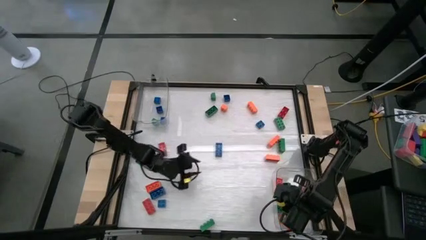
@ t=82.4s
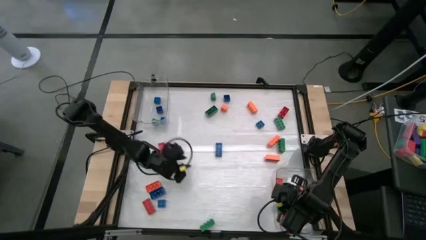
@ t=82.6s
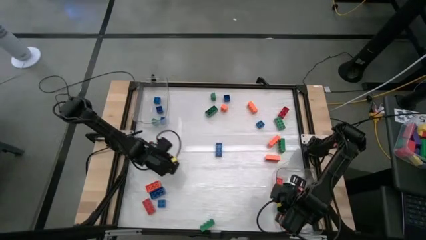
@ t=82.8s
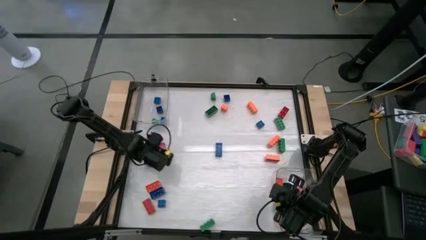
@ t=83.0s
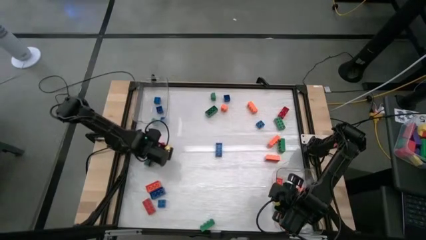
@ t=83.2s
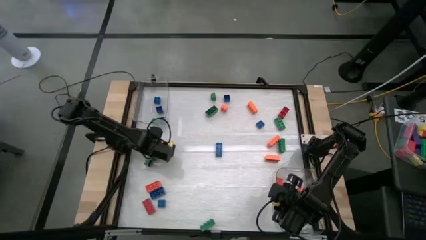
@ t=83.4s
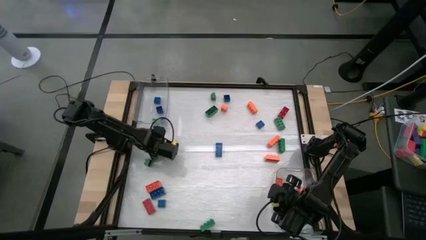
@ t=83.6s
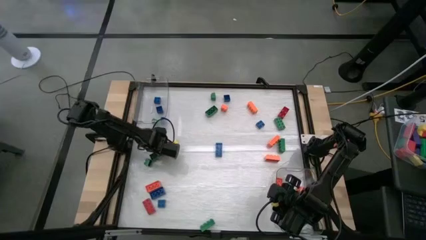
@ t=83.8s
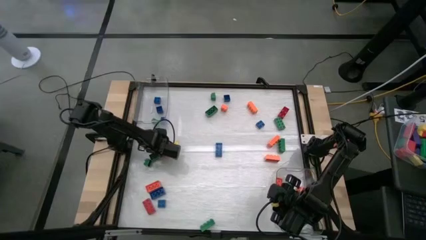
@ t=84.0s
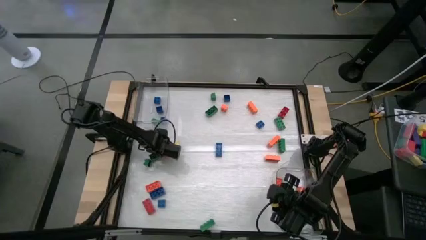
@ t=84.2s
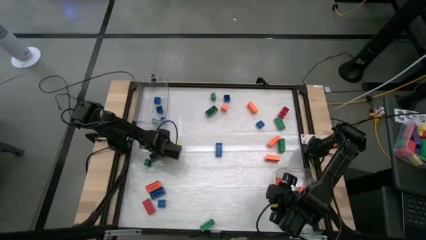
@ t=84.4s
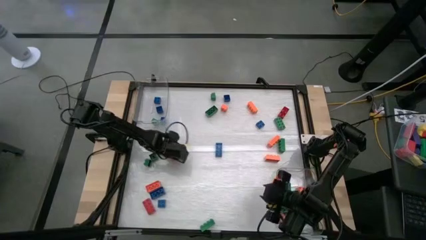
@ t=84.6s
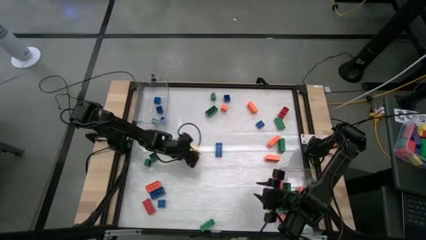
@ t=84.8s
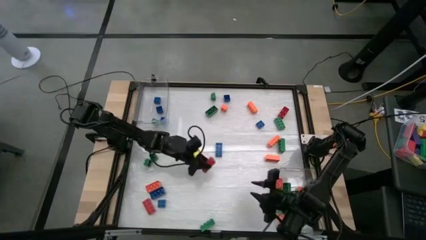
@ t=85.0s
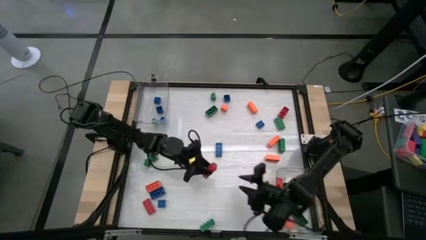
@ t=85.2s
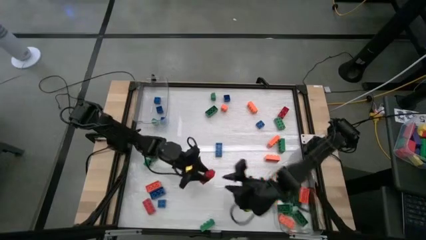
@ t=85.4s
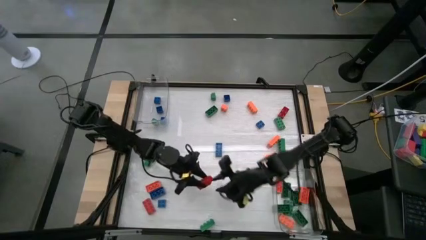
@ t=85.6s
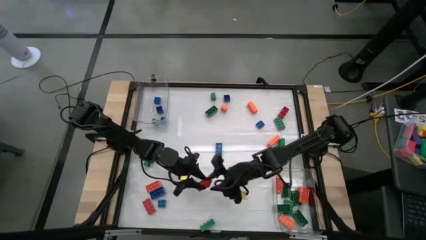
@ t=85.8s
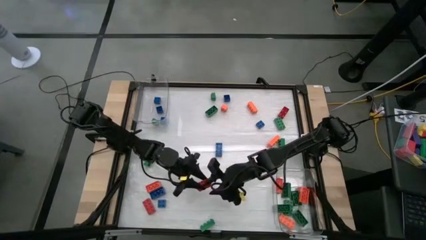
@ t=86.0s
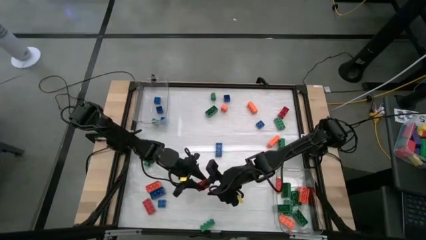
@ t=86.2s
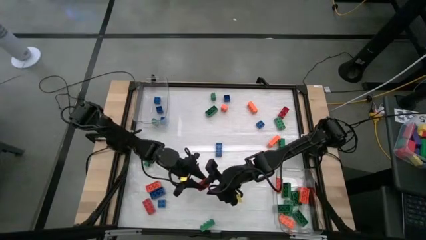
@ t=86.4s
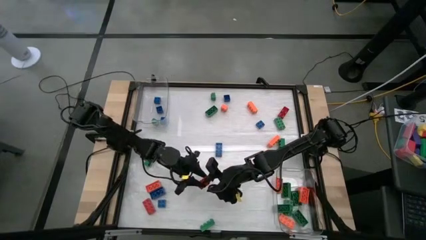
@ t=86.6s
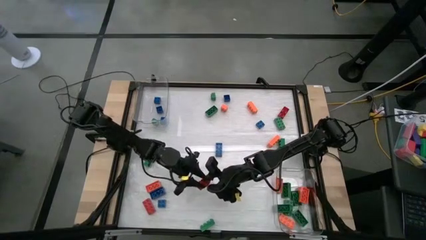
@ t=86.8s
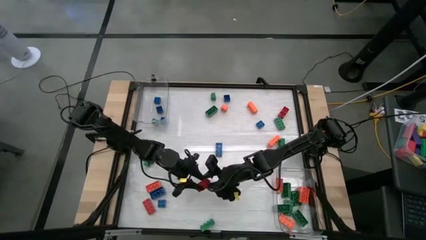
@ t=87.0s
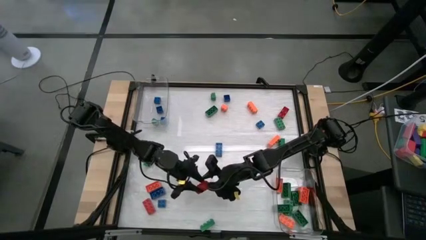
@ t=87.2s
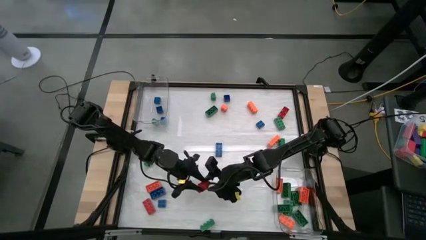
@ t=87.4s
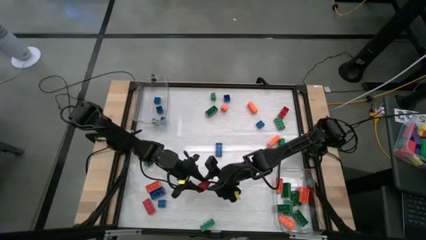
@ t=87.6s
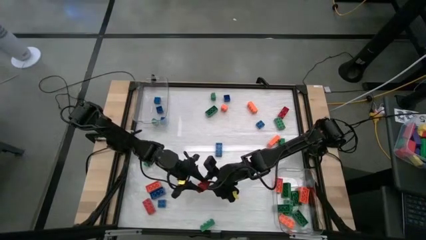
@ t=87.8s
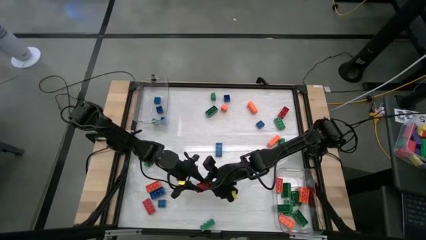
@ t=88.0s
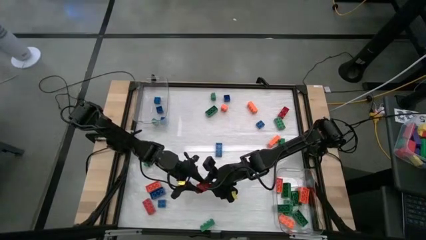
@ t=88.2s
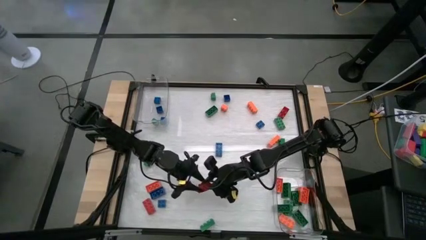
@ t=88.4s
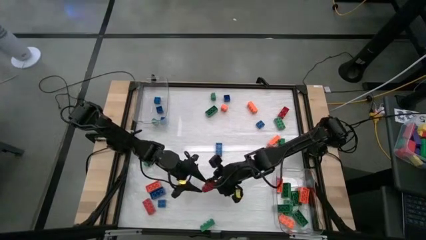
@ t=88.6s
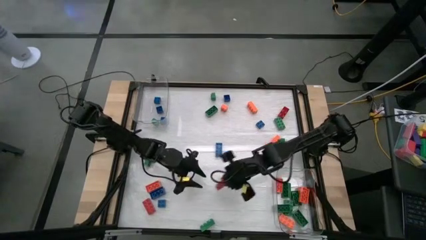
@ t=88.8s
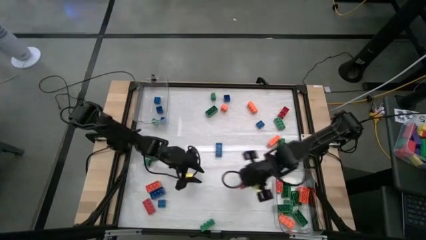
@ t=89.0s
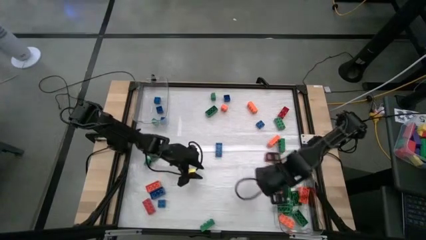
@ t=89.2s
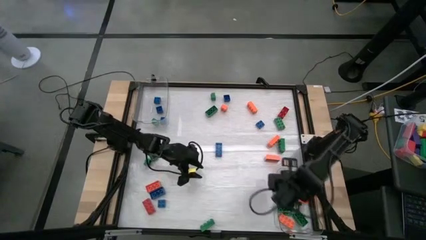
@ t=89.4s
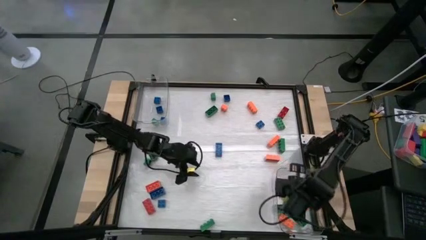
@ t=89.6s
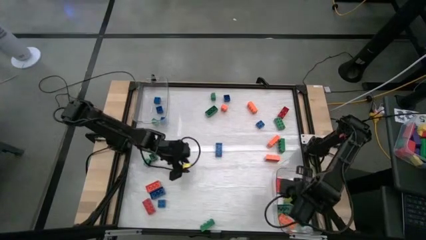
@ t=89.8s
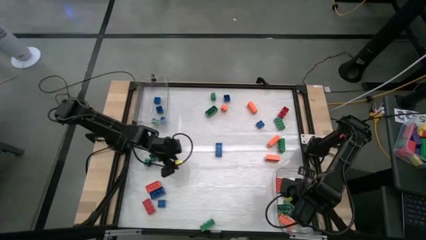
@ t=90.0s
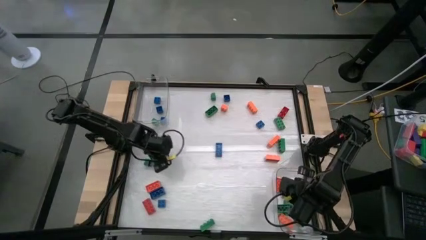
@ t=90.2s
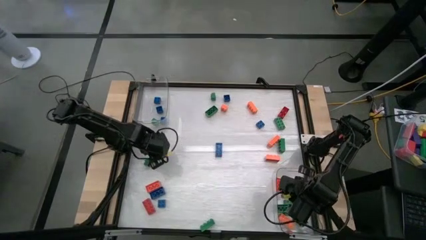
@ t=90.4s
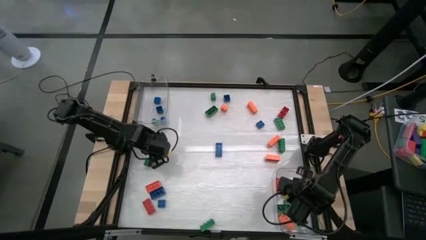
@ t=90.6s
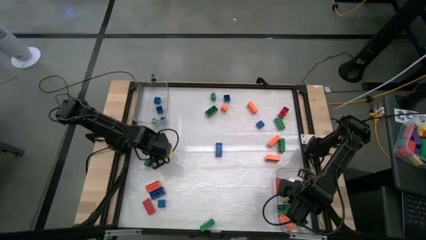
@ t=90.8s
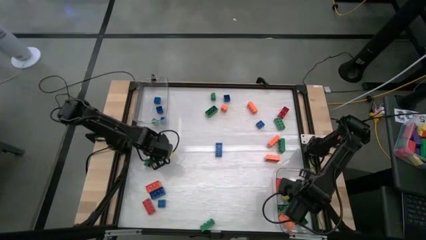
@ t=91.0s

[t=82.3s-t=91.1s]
Task: Sort blocks by size
Put the 8 stud red game piece into the bottom transparent bin

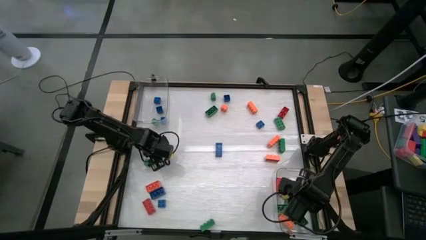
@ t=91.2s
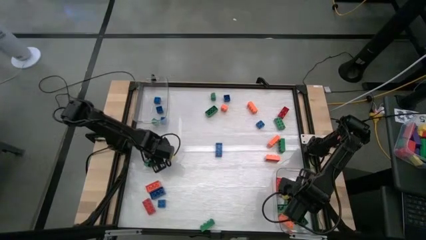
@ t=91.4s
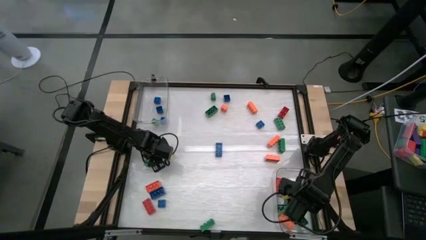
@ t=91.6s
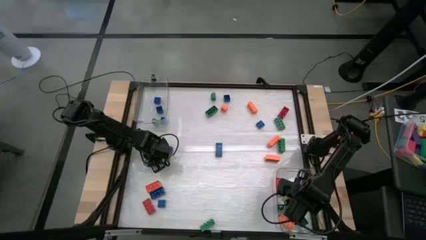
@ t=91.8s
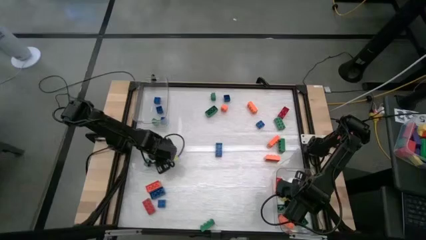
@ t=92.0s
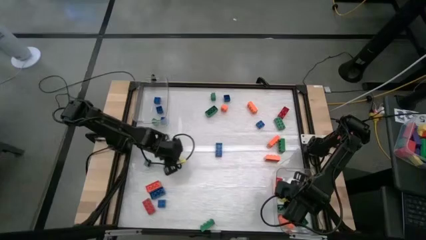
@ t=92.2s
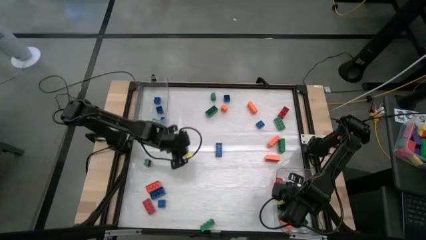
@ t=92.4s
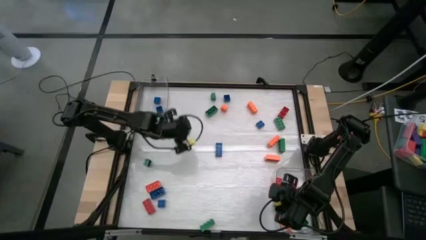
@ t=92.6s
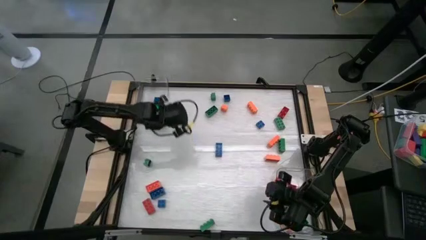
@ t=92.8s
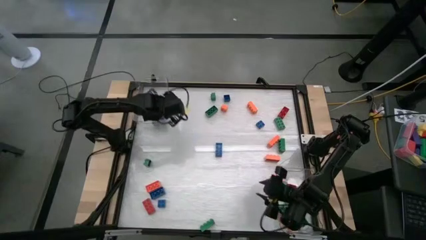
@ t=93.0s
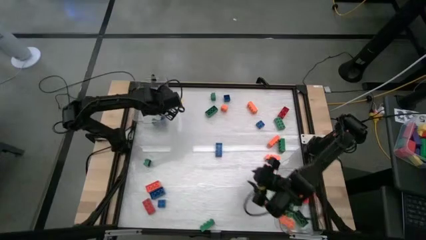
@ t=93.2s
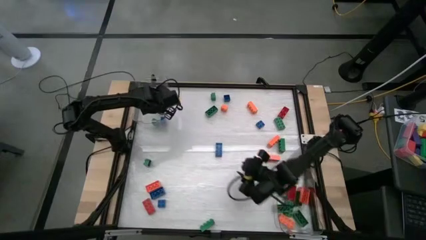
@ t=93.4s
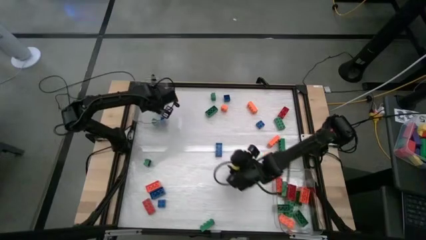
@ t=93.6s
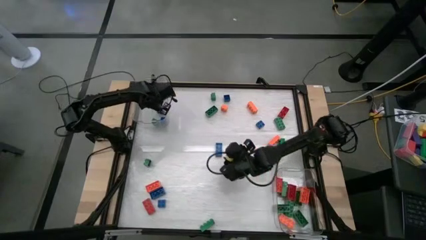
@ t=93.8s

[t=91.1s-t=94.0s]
Put the 4 stud green game piece into the top transparent bin

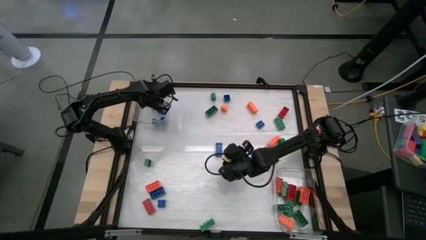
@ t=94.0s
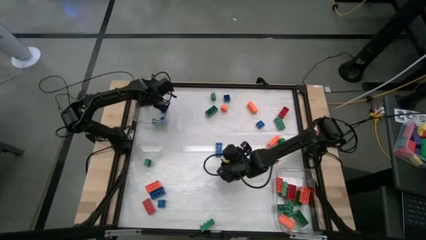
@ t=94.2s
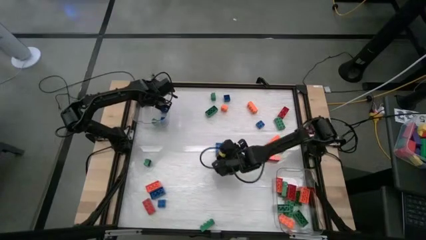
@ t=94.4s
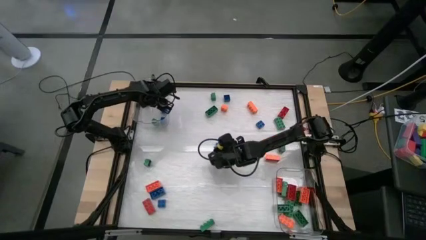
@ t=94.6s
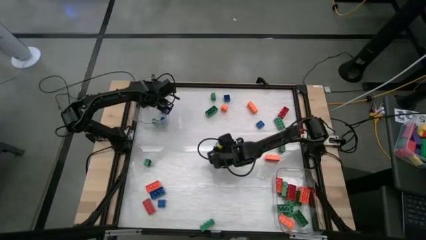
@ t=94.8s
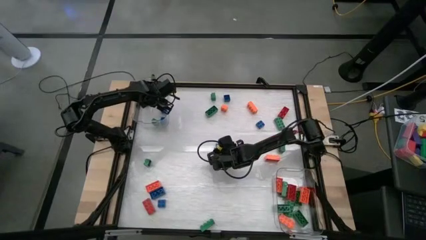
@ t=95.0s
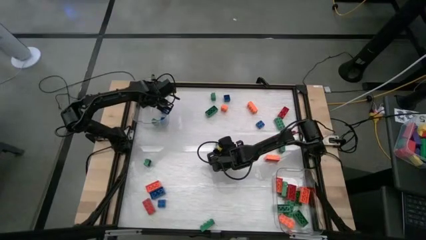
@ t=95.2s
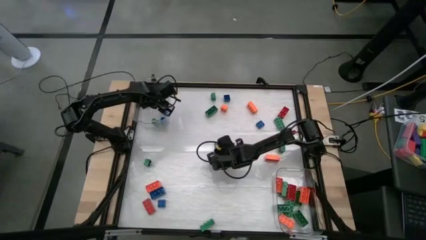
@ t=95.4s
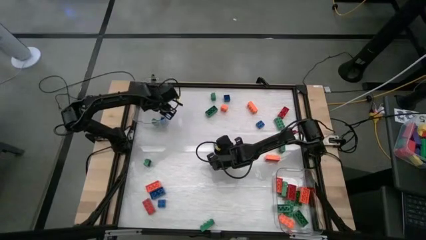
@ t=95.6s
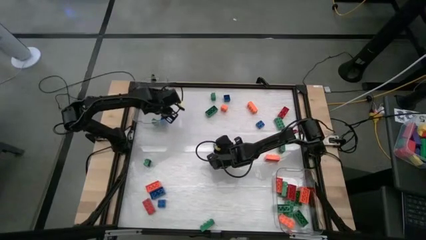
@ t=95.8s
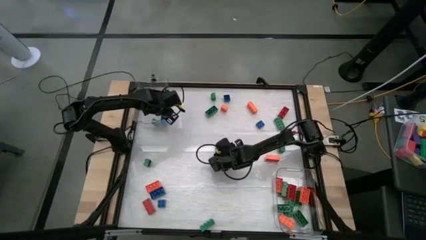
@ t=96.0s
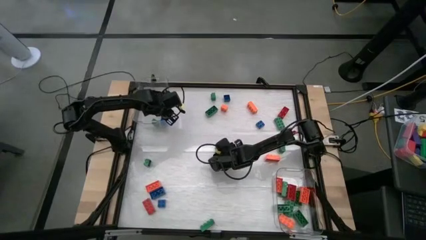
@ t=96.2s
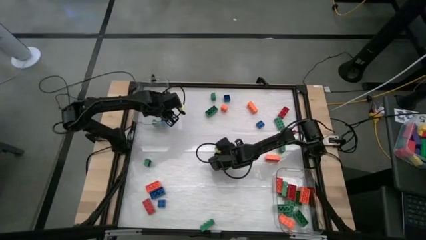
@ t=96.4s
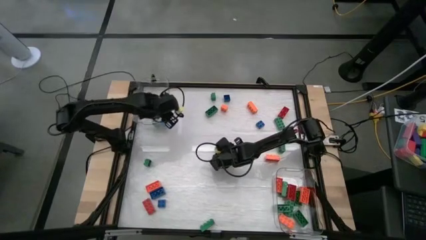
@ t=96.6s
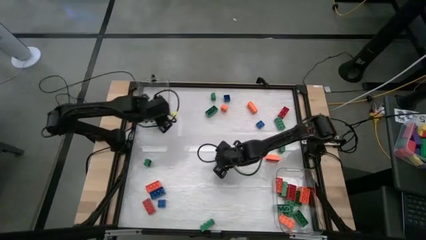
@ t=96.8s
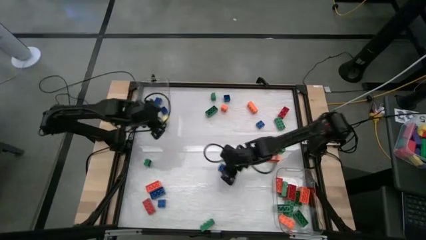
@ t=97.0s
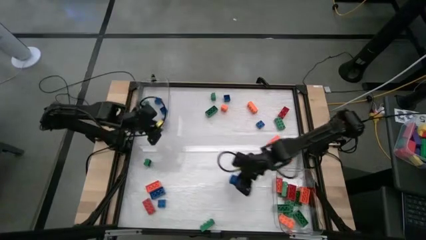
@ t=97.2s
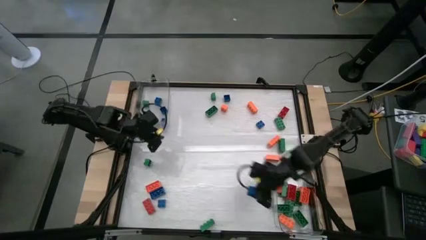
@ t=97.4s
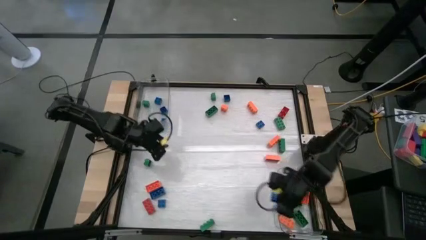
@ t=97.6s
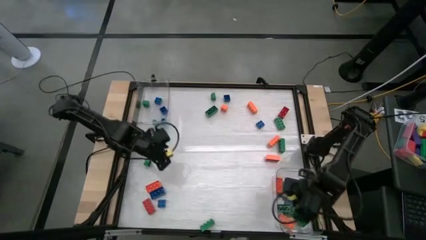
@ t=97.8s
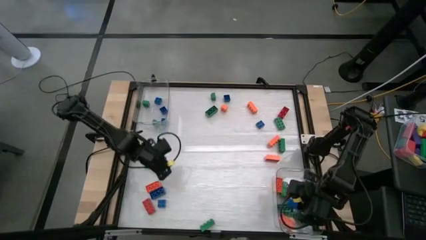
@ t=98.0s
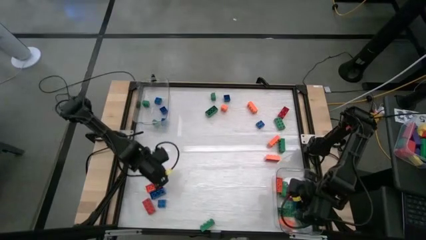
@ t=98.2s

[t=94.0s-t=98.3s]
Put the 8 stud blue game piece into the bottom transparent bin

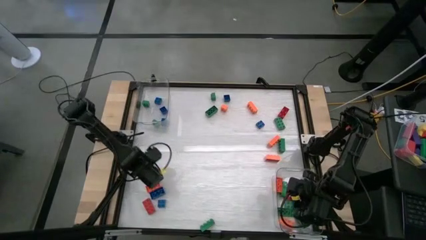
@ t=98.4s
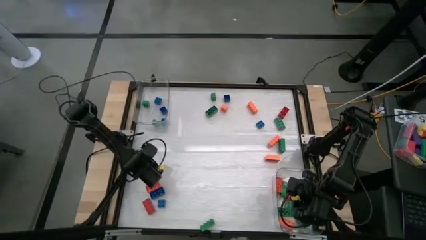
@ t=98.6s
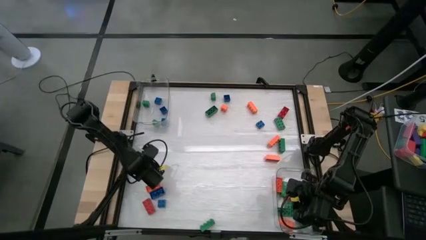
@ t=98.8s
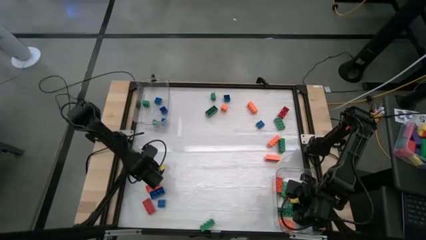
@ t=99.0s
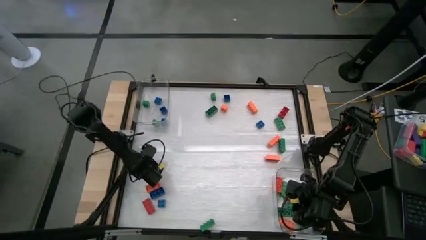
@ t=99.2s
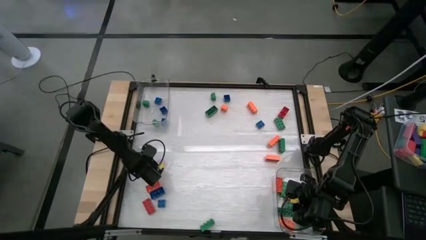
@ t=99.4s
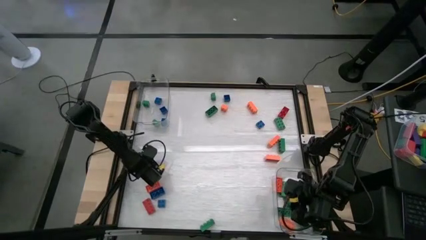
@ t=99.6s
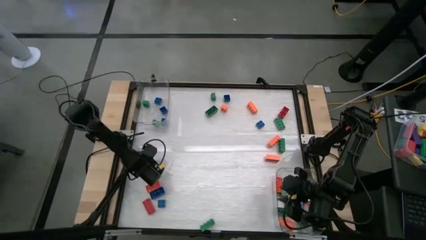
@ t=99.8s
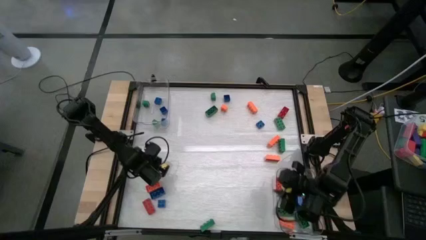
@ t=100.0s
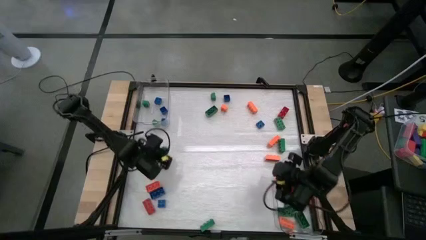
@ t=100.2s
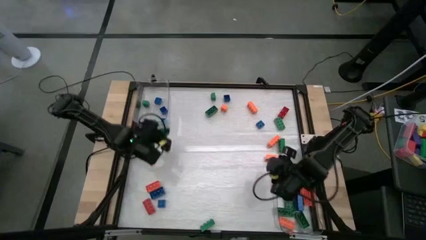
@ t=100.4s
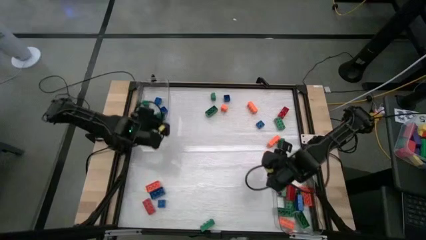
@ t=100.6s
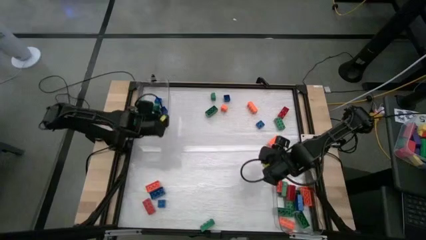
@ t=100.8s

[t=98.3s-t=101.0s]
Put the 4 stud green game piece into the top transparent bin
